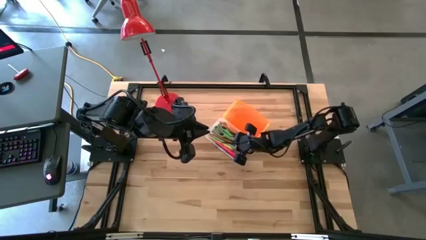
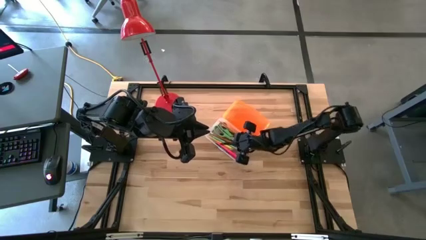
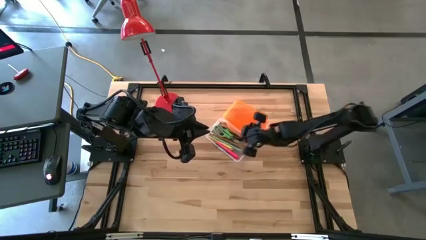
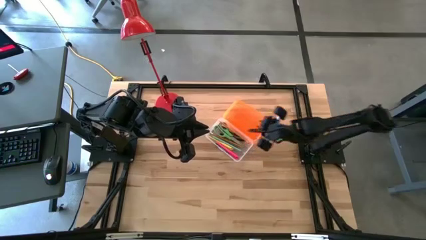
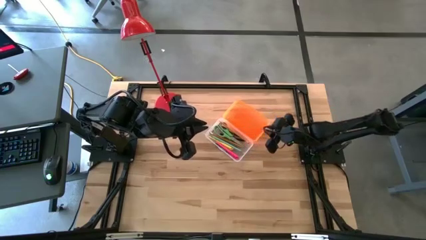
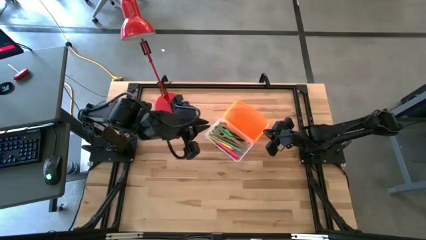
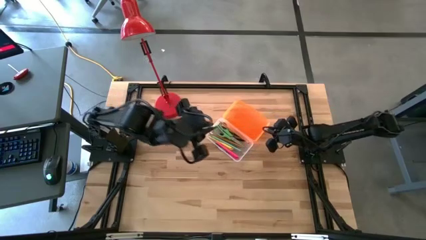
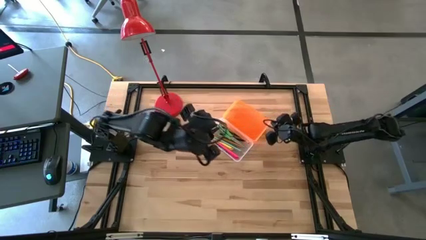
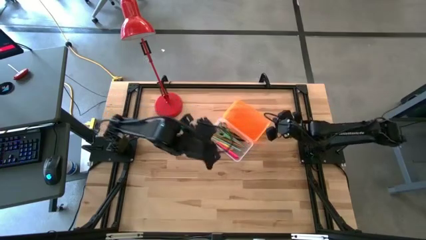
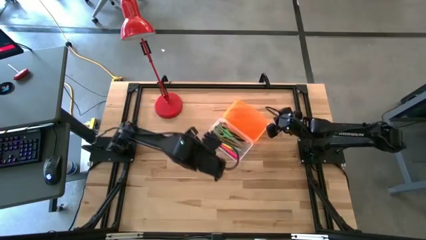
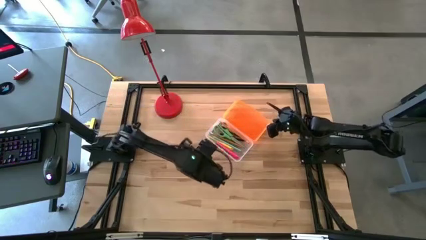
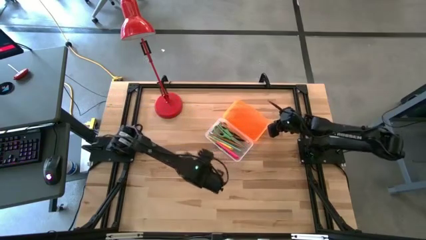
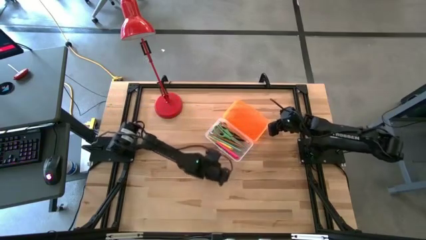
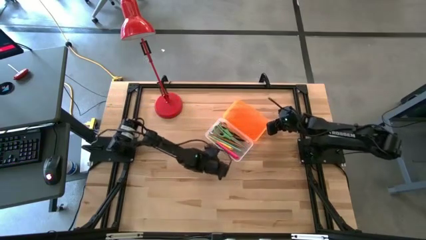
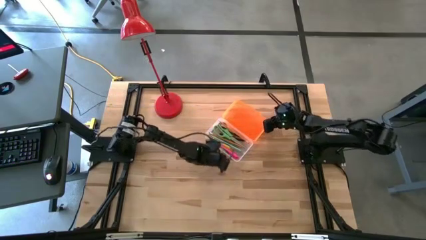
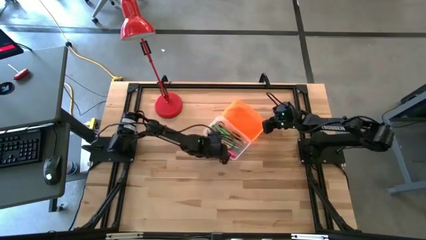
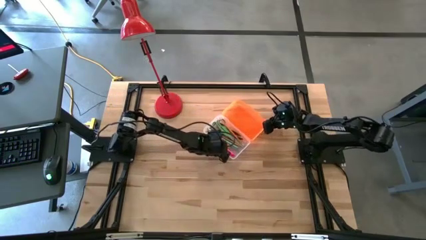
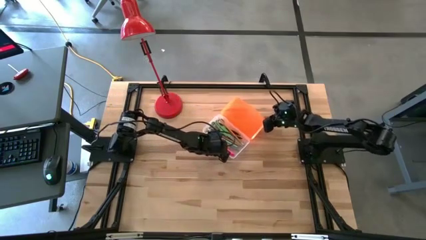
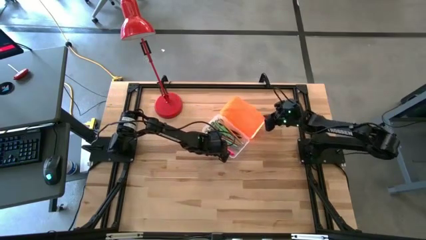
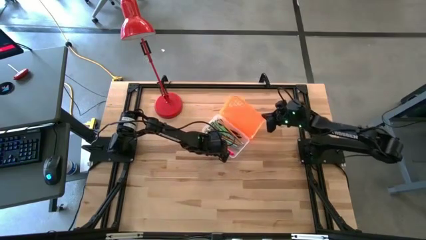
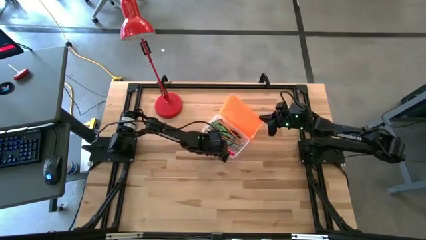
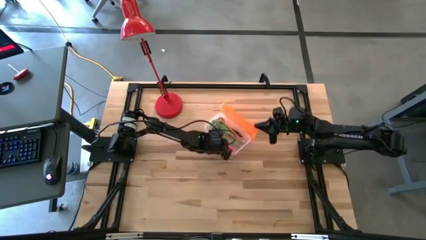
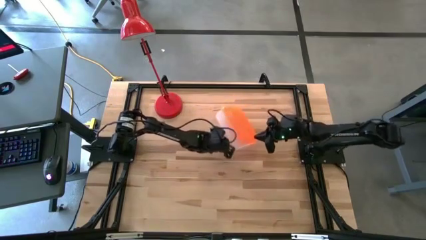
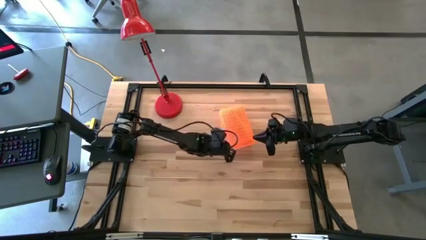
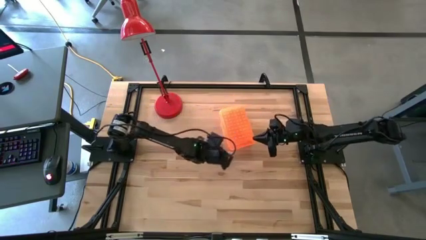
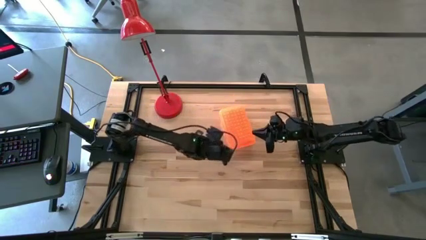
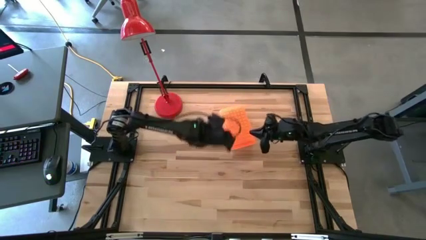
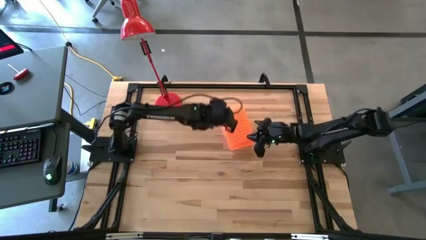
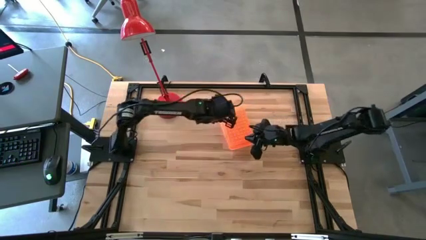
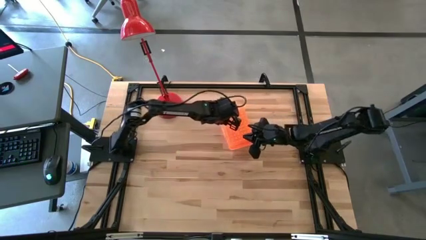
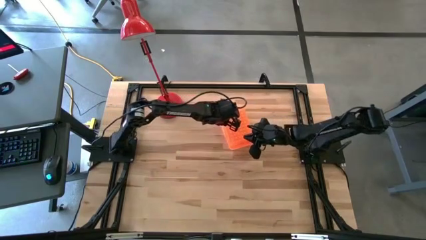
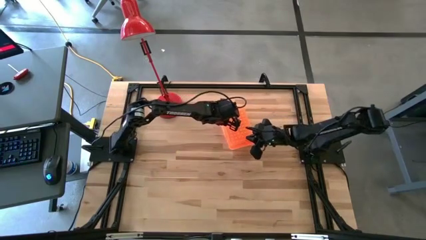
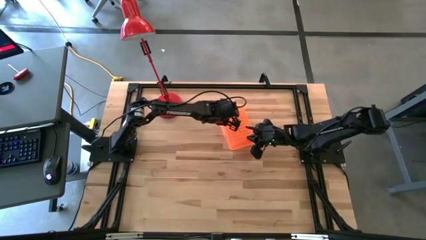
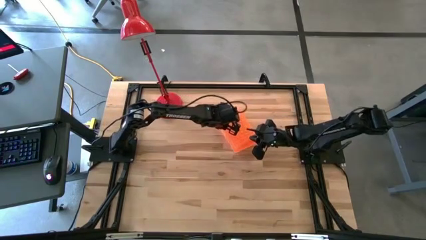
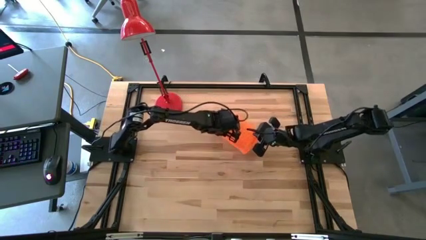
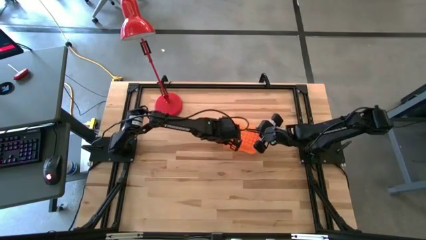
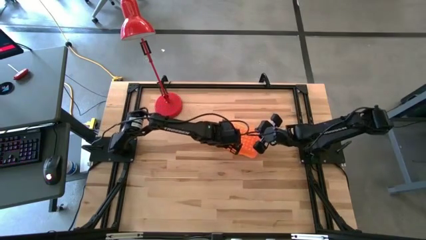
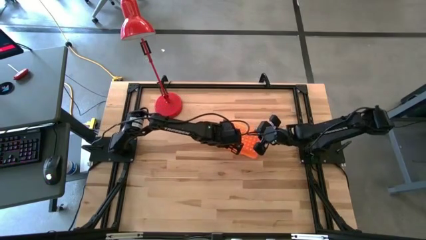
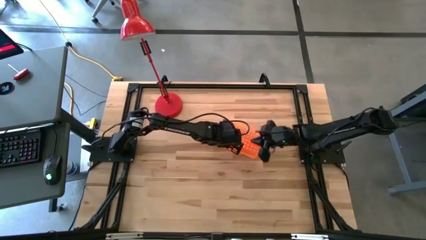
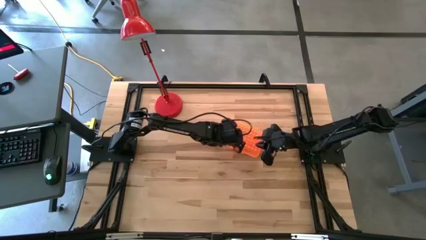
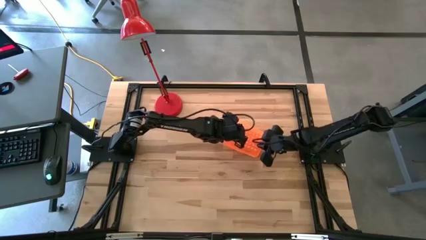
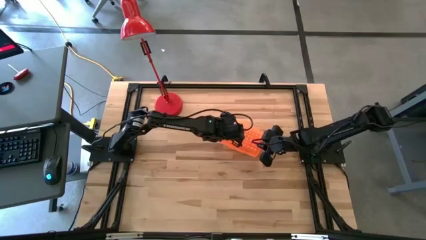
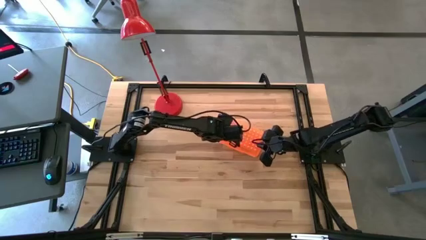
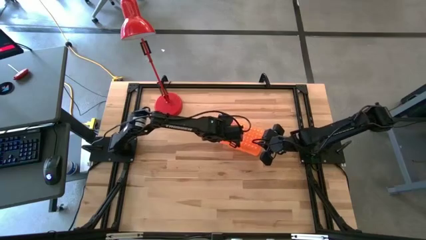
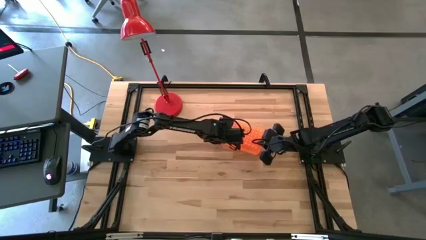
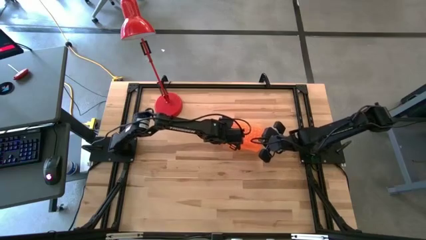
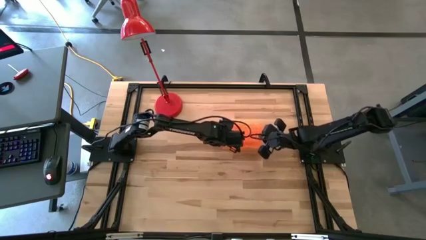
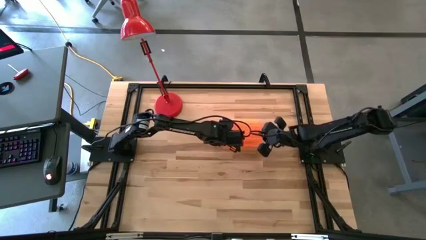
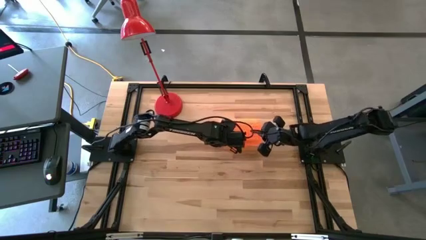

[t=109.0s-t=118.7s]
Task: Pick & place school supplies into a supply box
Close the lid of the supply box

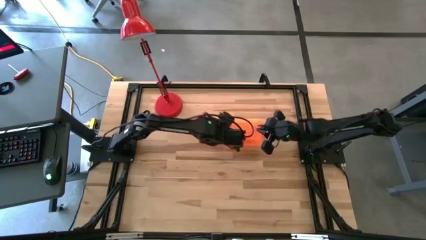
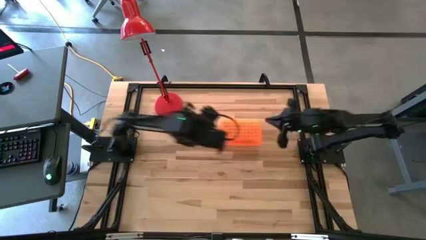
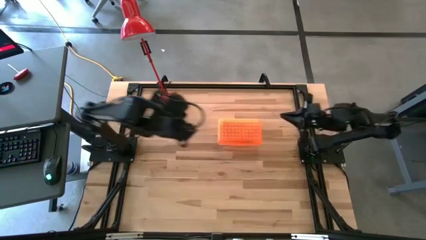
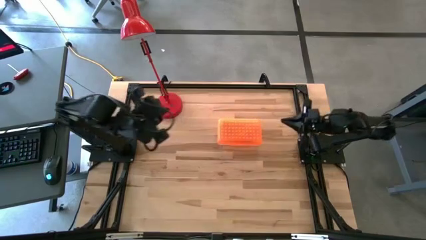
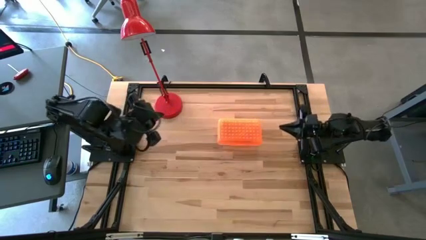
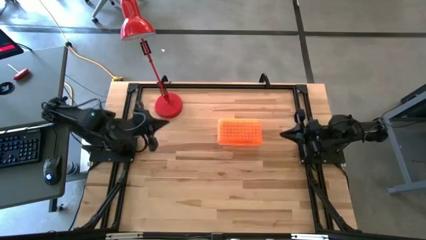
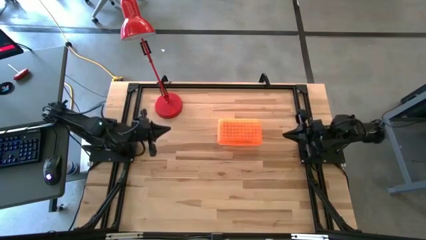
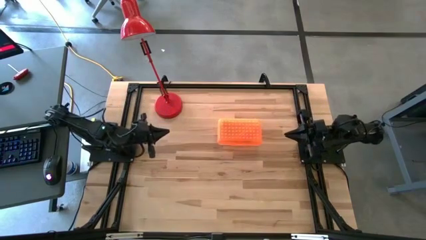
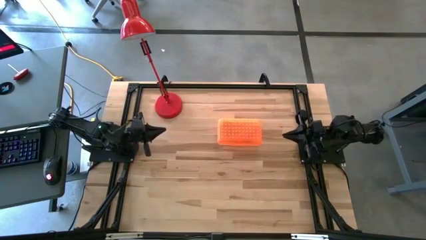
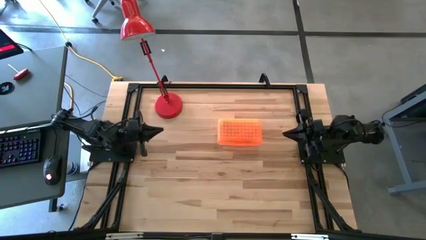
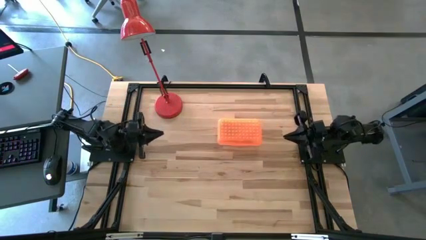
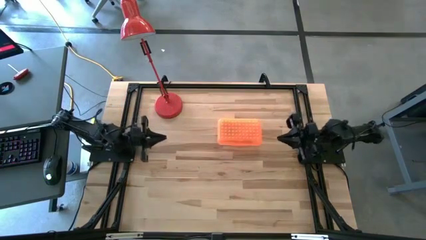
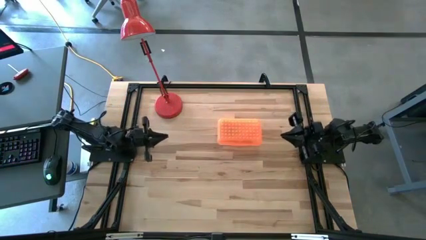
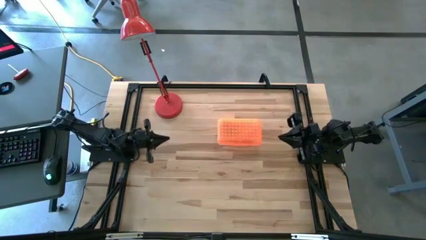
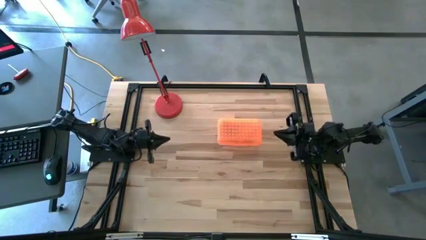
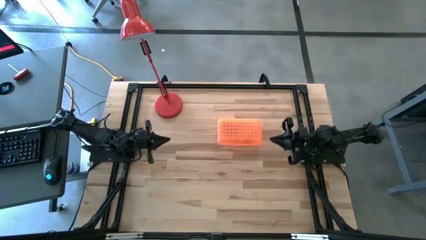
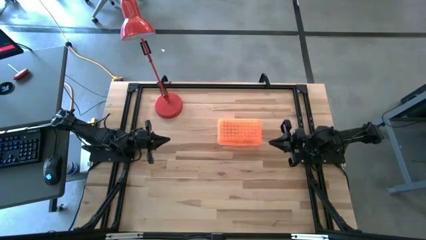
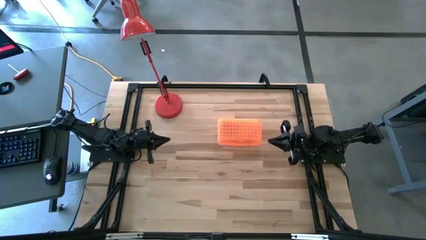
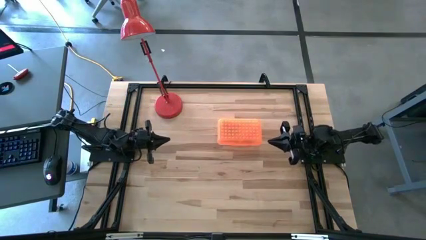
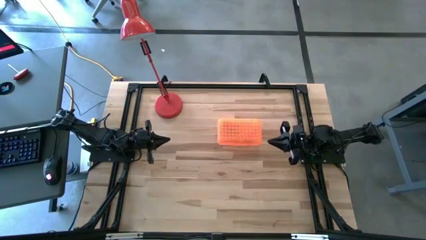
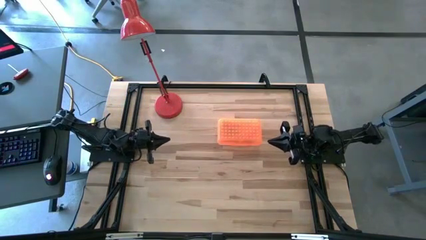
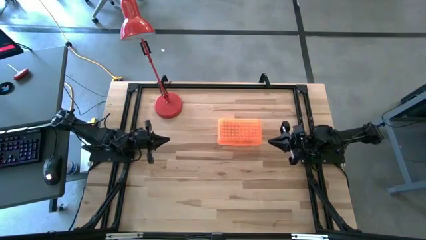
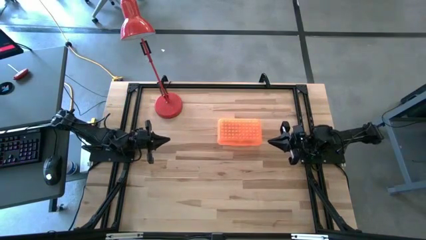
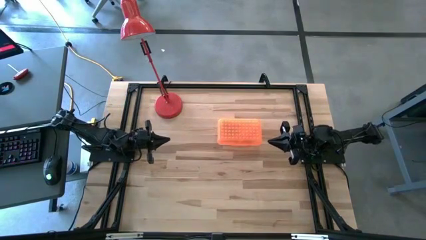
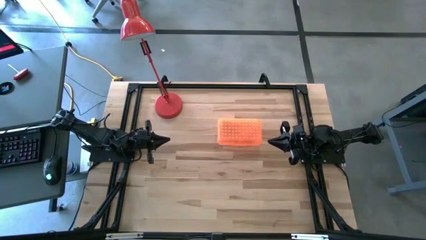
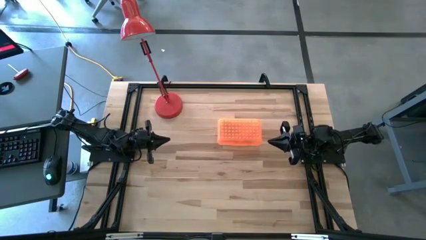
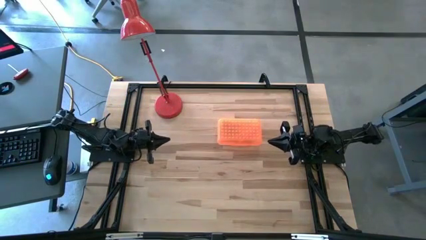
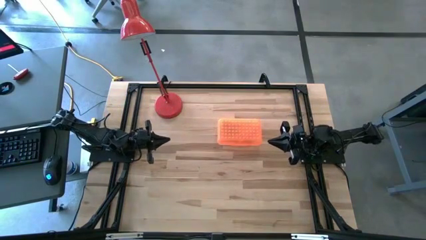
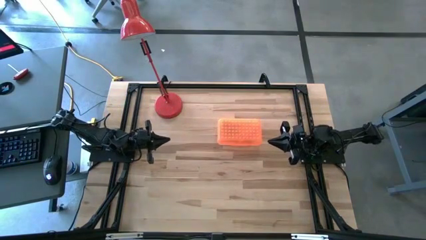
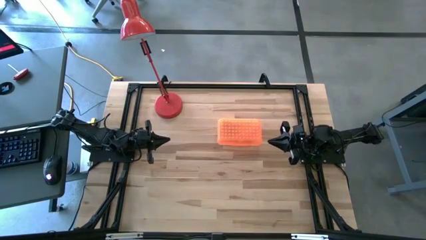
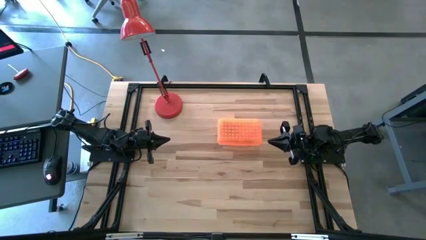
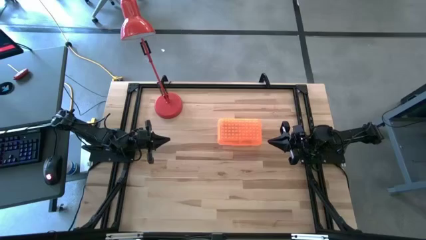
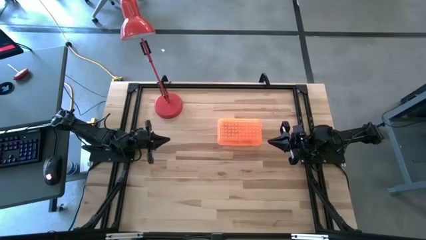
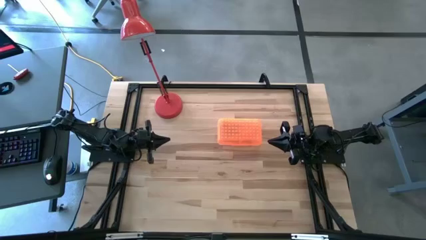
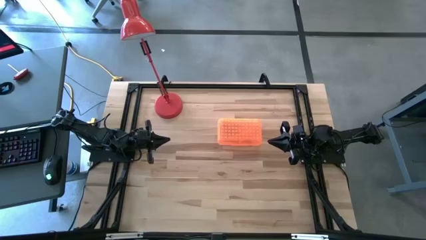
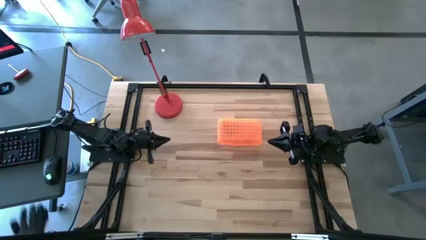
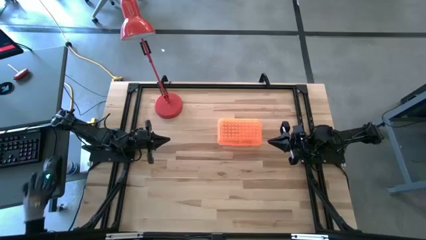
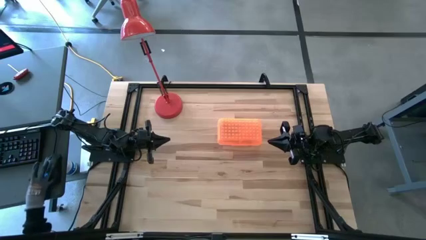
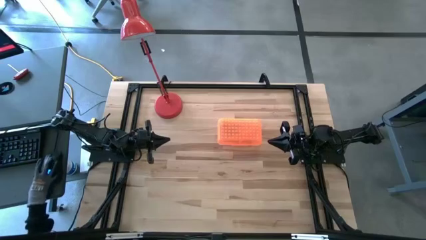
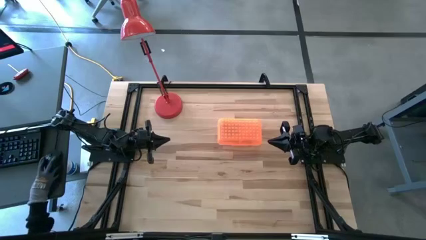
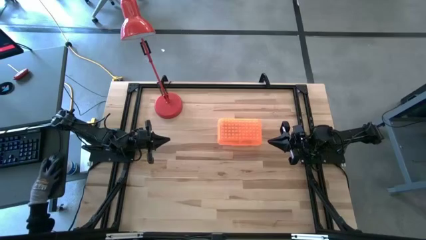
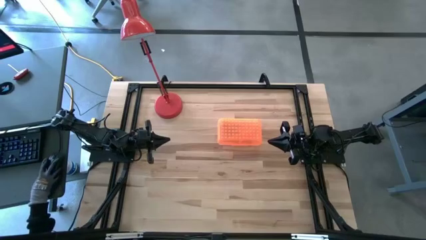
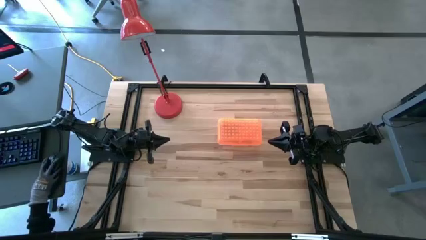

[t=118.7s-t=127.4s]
Return to Home Position
